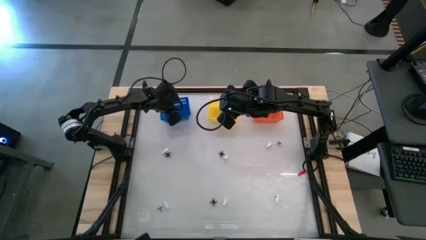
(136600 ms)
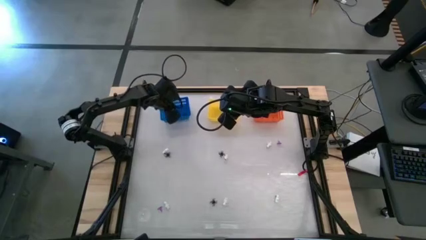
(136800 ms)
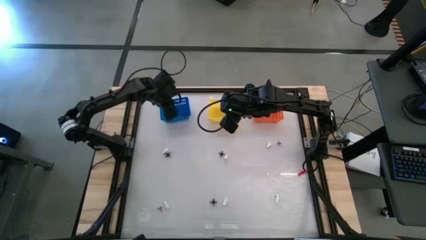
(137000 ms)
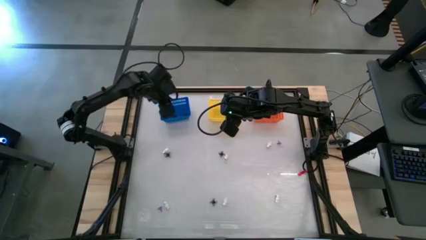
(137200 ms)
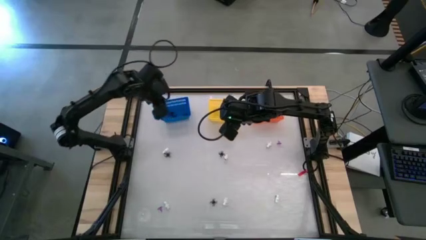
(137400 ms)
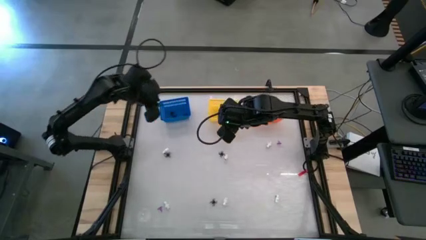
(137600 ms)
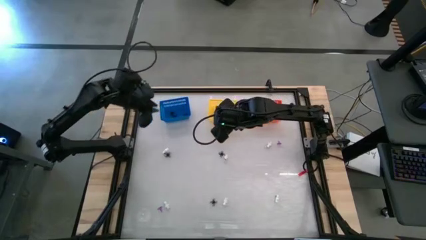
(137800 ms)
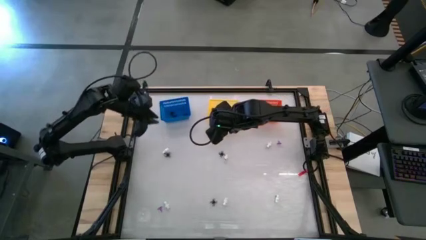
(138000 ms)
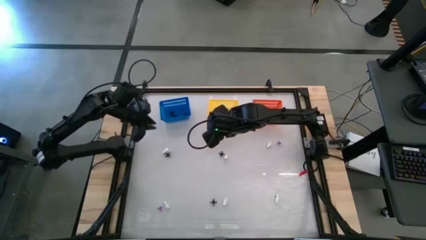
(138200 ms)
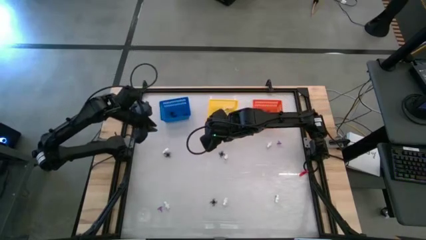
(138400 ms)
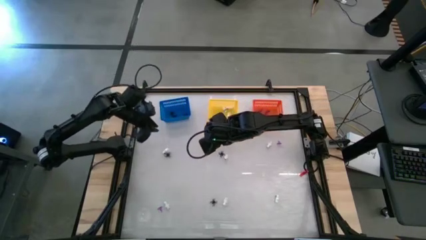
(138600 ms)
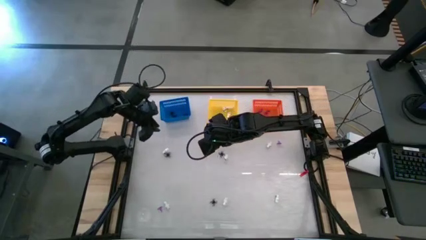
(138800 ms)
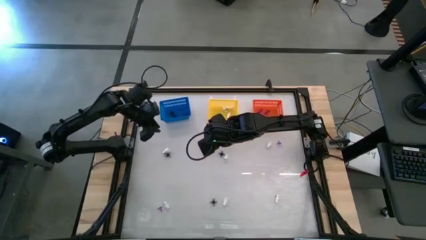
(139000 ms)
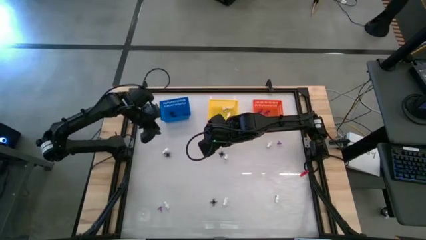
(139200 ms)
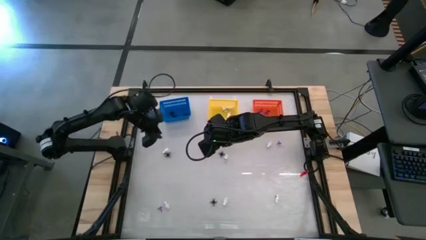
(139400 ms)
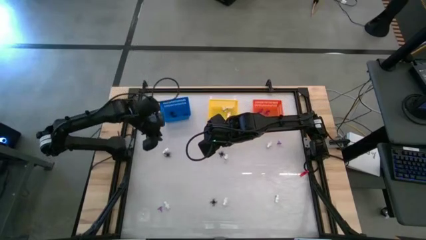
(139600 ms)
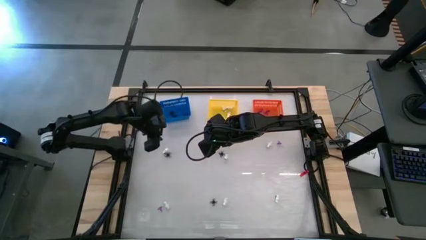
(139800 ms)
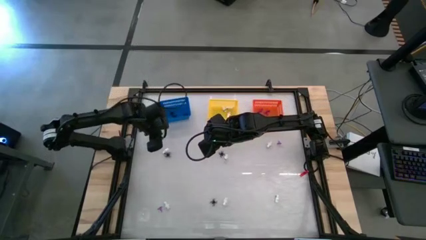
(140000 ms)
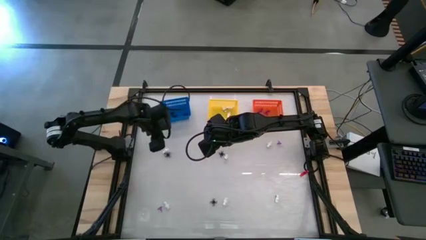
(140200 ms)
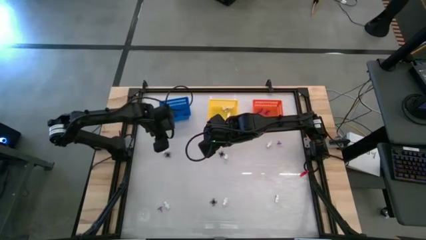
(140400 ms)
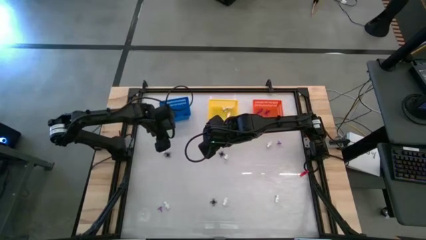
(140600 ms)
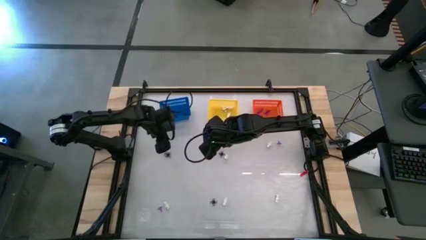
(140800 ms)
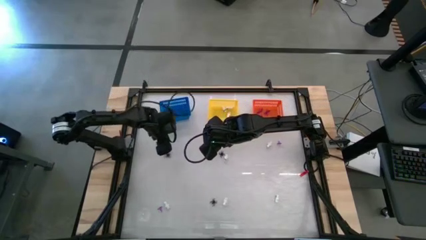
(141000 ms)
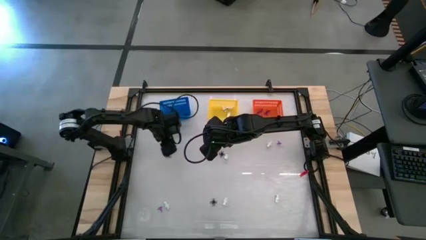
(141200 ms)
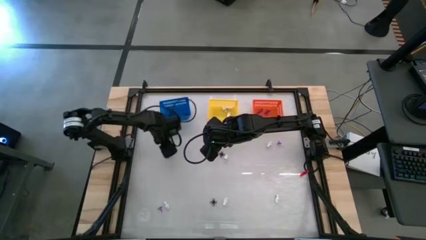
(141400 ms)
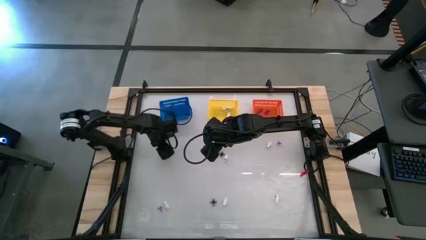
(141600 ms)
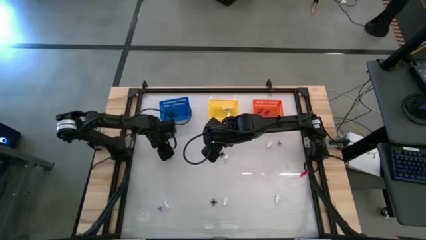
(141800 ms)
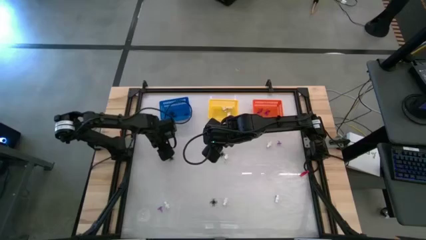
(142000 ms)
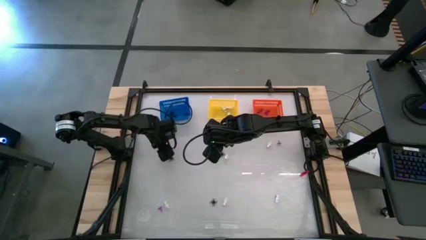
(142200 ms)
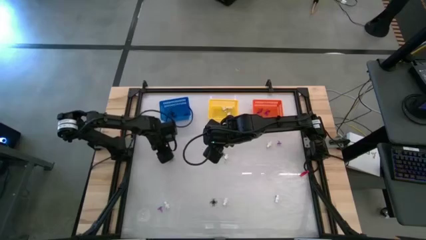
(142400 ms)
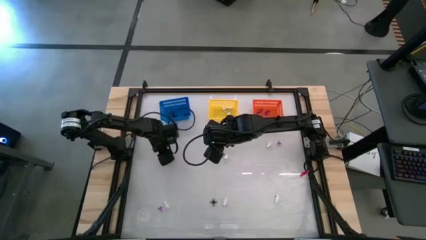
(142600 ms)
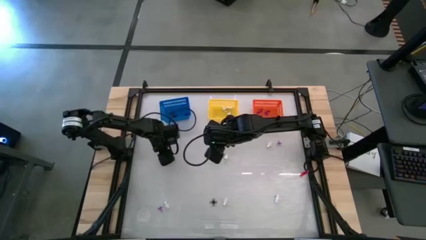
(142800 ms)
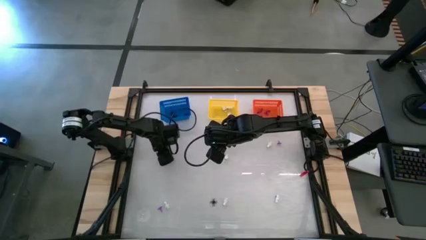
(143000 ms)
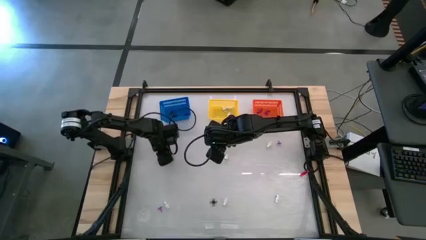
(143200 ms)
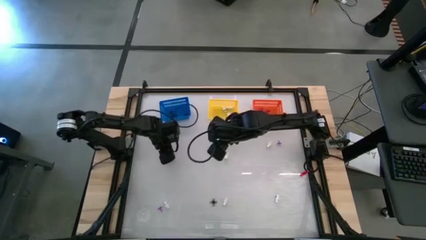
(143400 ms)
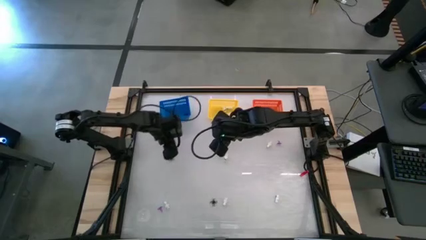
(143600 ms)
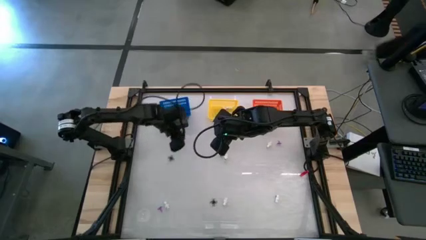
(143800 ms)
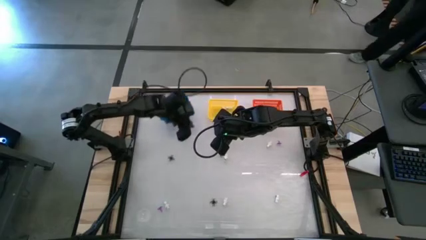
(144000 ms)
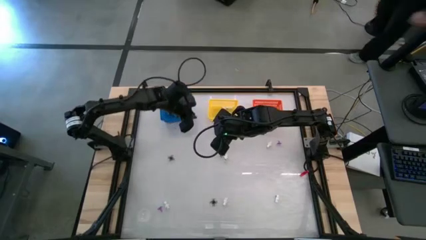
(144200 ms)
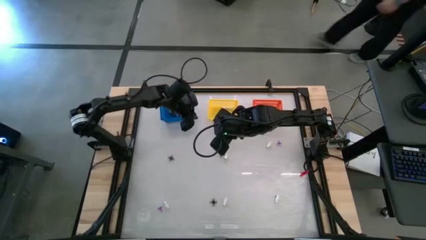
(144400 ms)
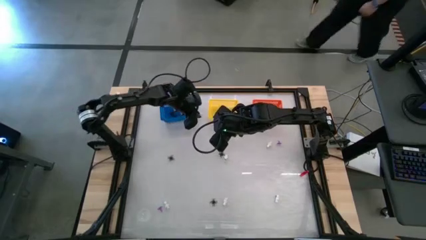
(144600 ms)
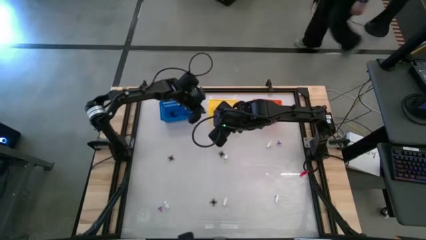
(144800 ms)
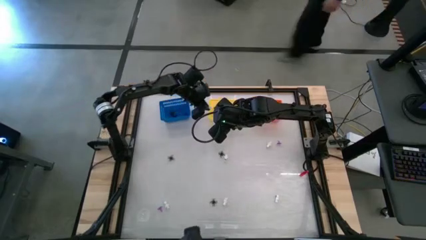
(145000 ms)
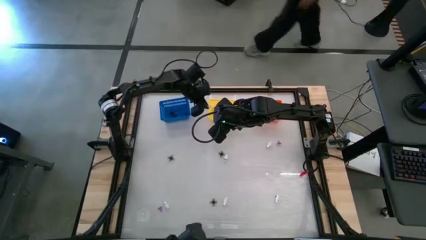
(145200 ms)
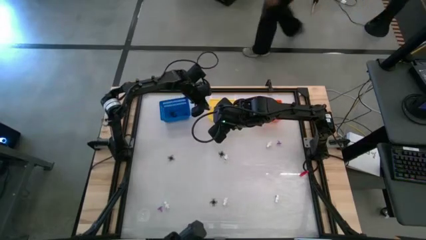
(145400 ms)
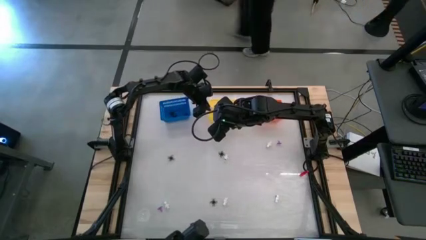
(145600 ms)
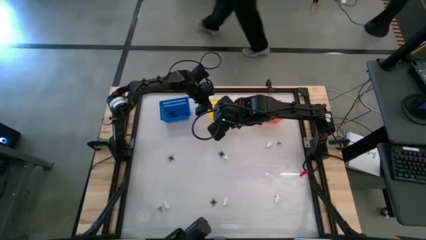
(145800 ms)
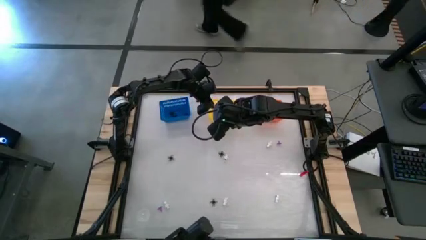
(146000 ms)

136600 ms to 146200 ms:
Task: Sort Halloween decoration
Put the white skeleton toy into the yellow basket

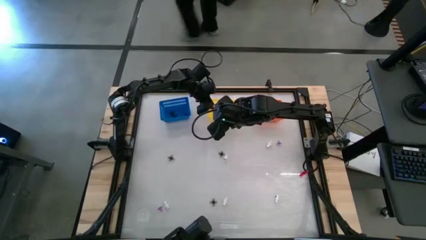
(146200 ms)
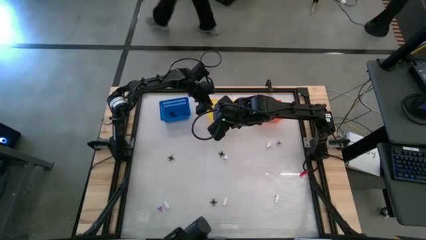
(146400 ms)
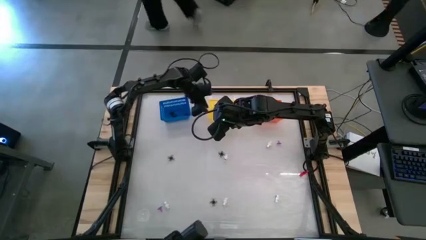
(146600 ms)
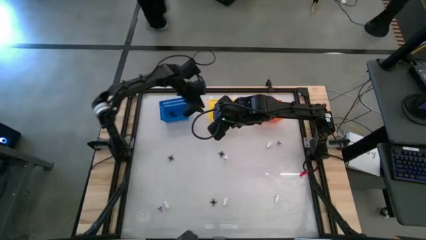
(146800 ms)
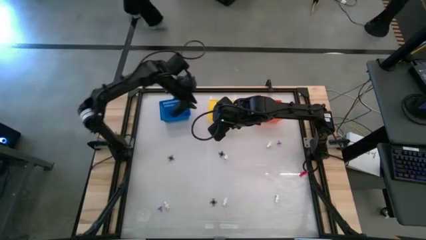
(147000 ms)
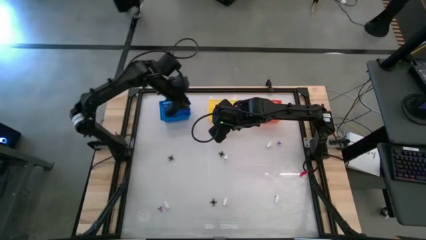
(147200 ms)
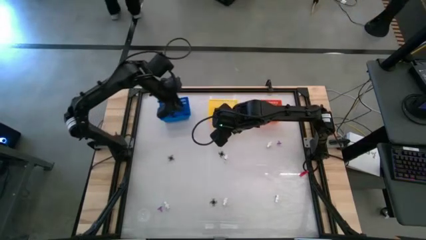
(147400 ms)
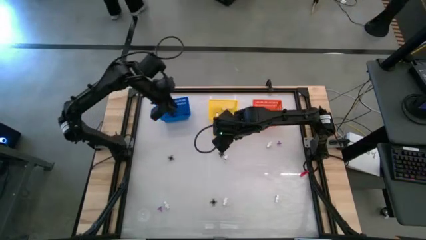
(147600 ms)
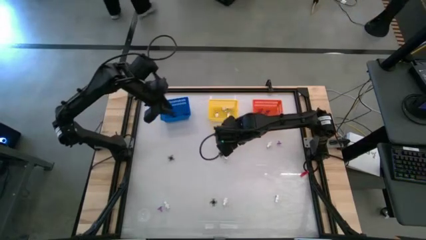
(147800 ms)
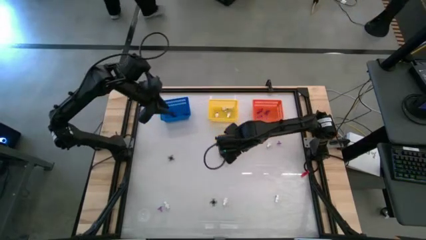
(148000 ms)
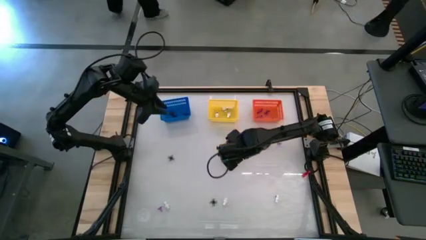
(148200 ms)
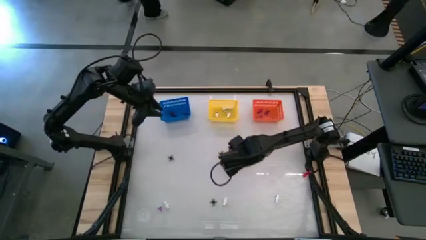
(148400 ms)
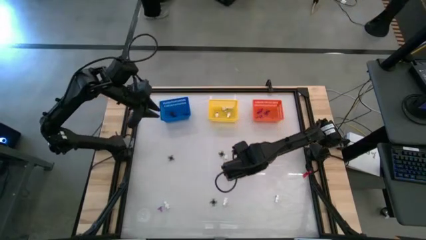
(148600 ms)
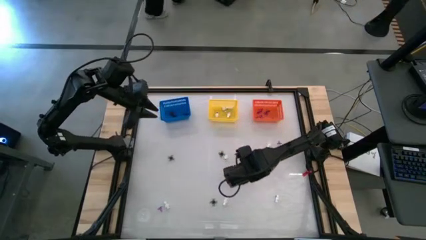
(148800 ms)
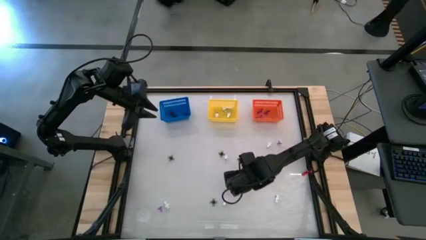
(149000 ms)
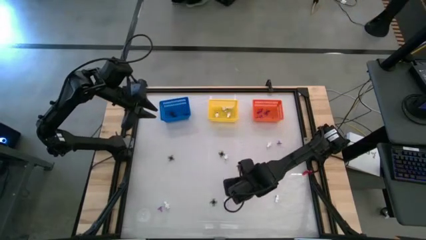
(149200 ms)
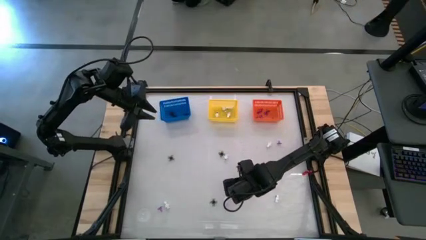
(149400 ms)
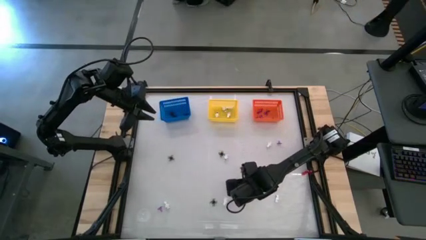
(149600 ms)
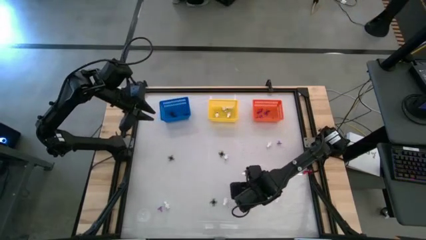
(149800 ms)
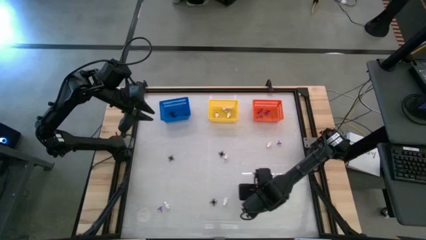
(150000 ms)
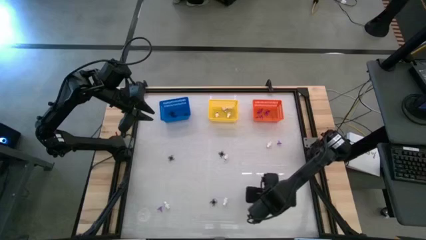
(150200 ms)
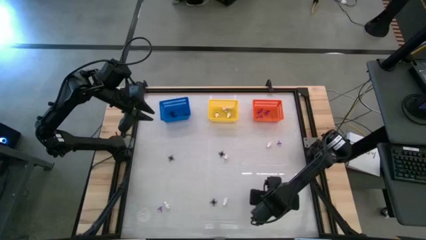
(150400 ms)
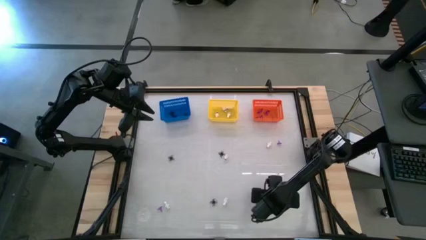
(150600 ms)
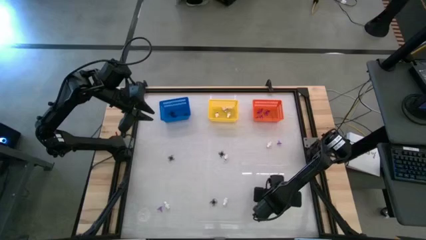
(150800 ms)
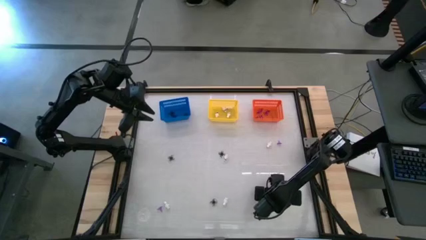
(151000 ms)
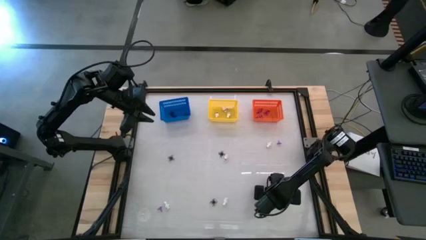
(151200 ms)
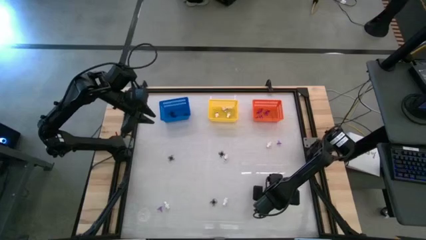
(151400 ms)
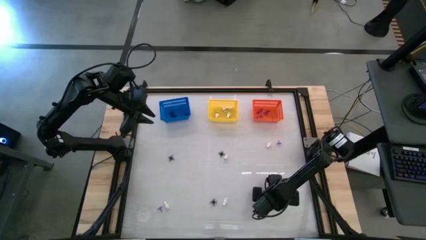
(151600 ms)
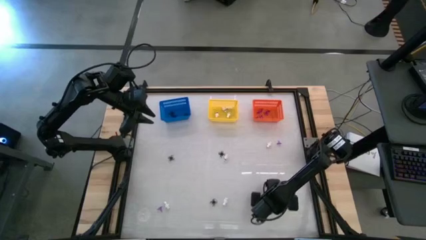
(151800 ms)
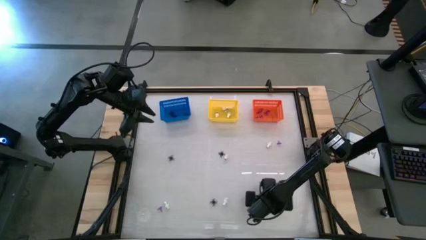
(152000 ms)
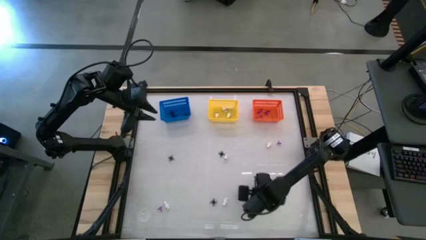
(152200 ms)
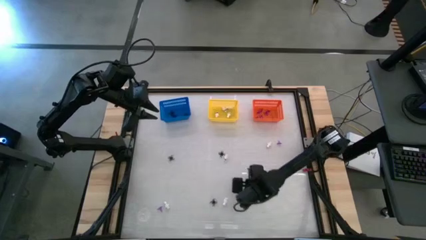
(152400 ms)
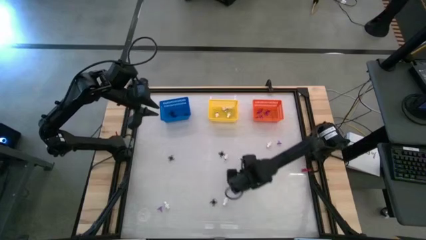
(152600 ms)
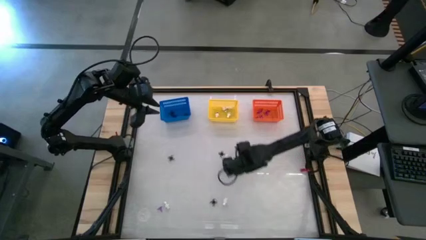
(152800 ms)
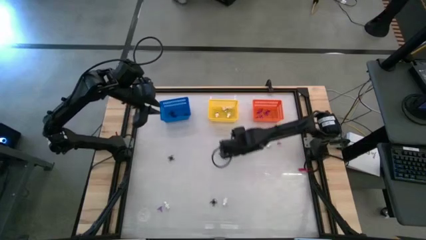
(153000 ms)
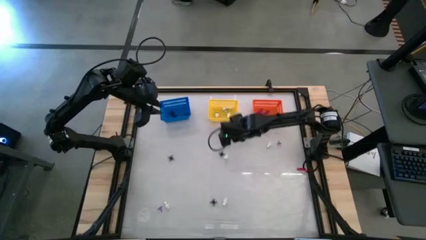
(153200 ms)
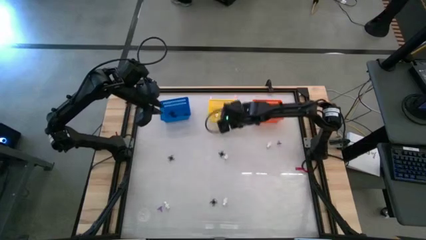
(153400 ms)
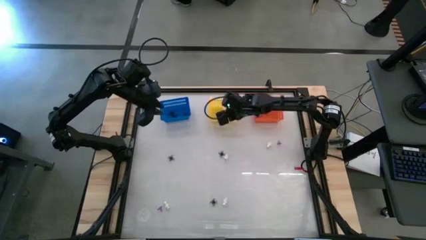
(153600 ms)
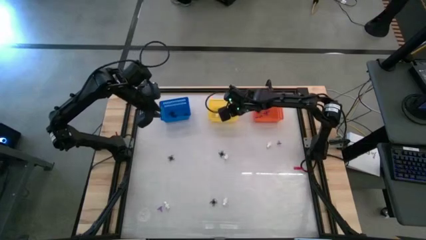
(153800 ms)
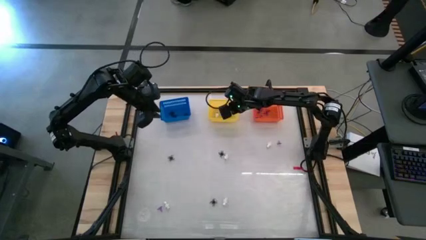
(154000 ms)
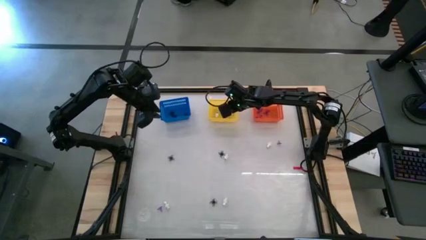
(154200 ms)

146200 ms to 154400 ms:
Put the white skeleton toy into the yellow basket
